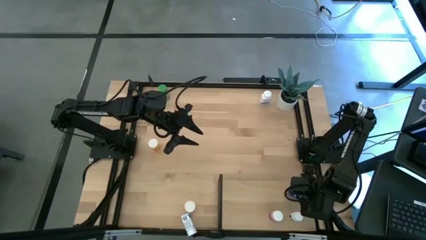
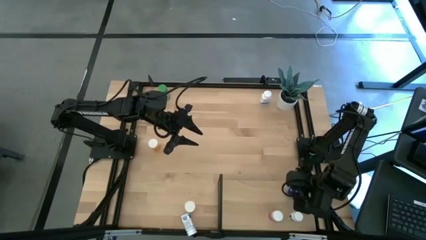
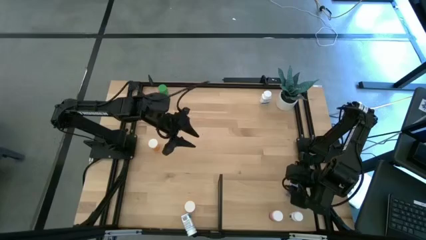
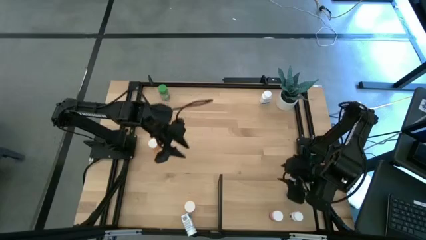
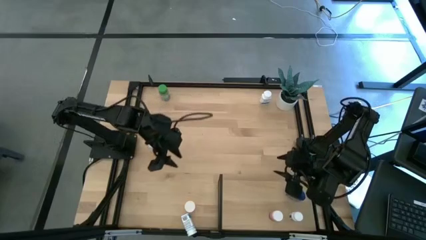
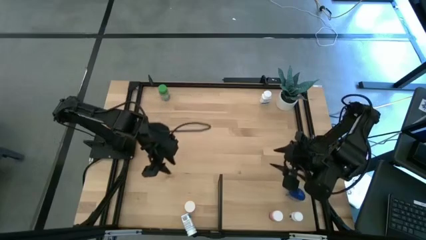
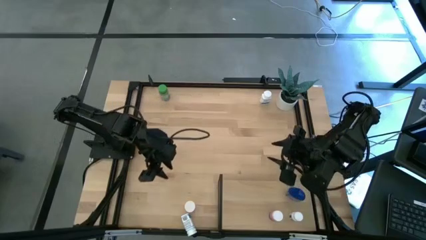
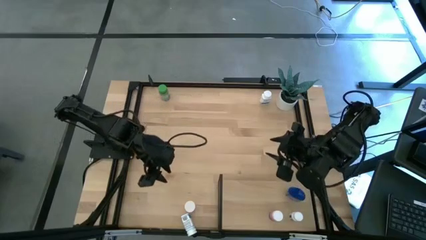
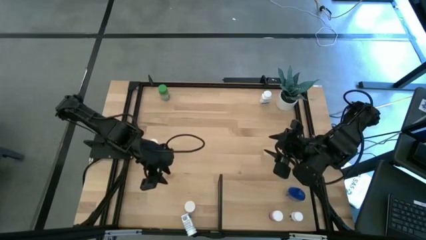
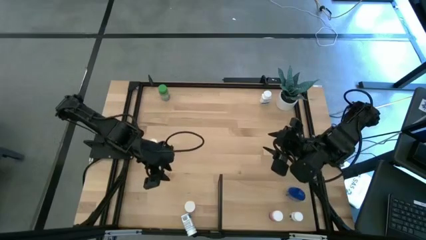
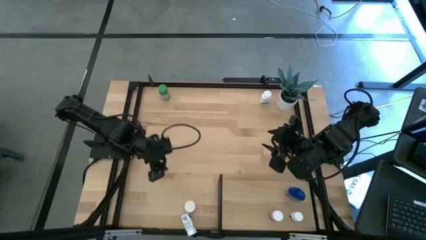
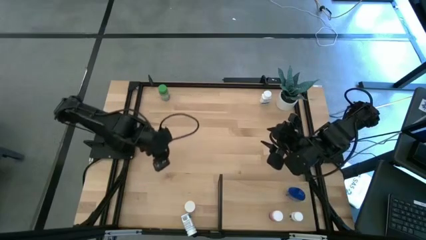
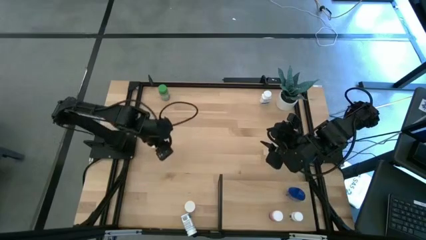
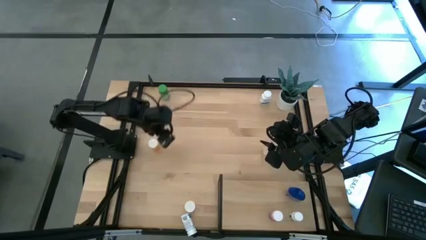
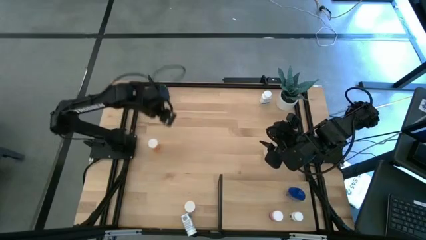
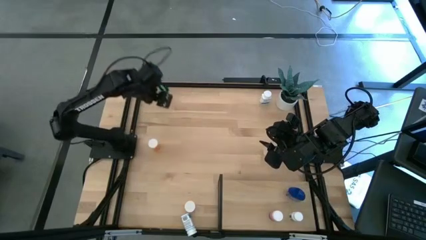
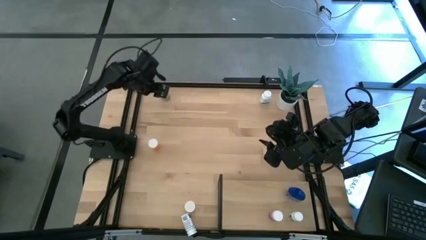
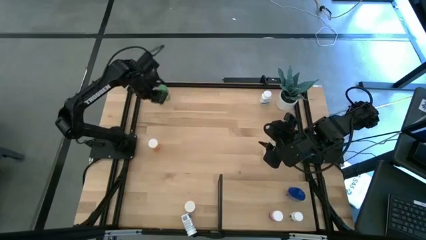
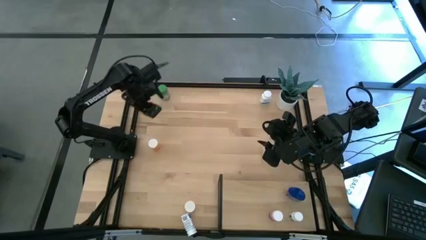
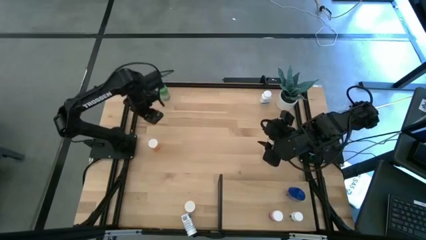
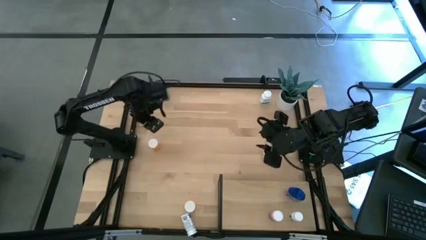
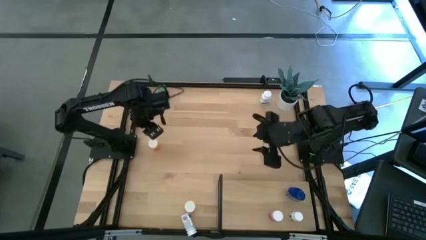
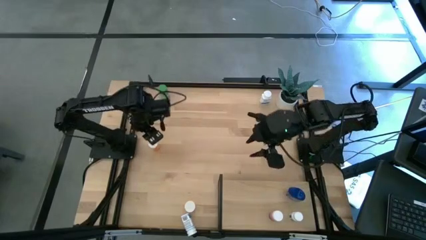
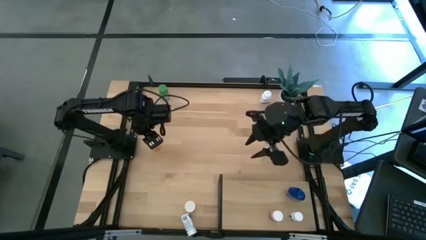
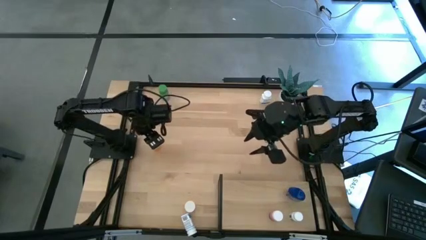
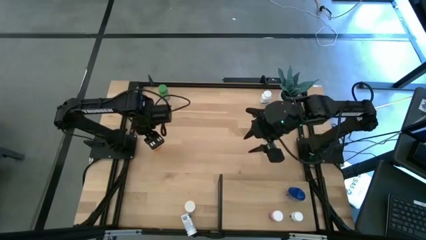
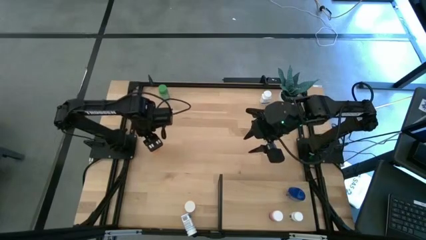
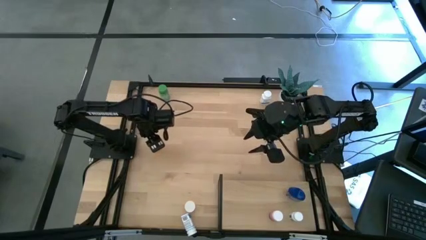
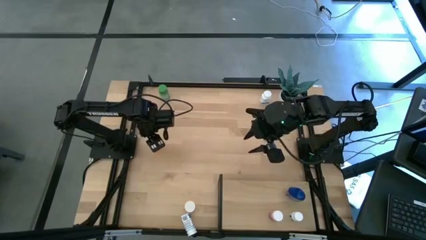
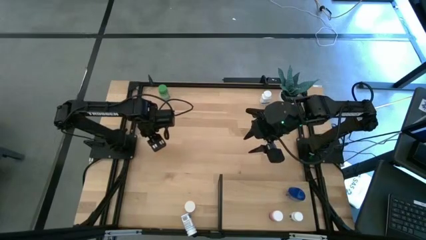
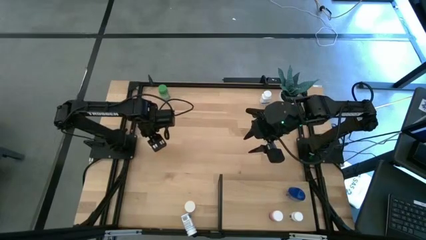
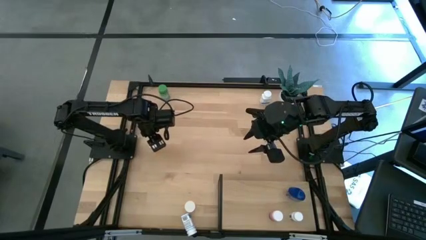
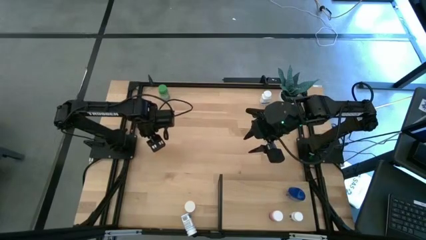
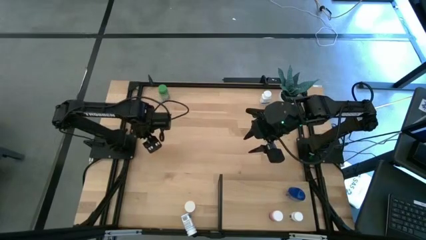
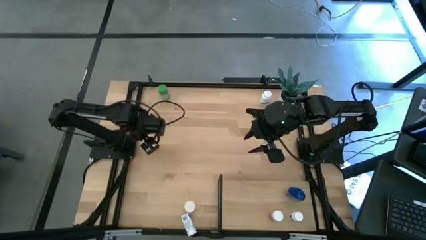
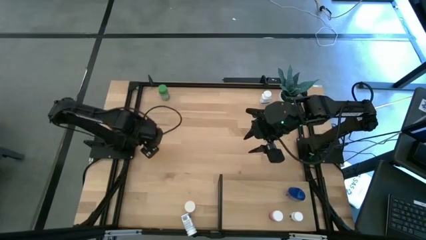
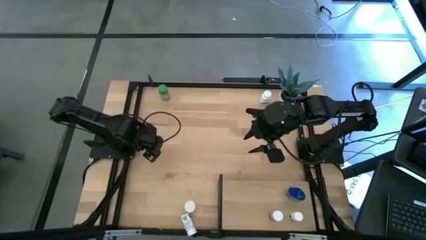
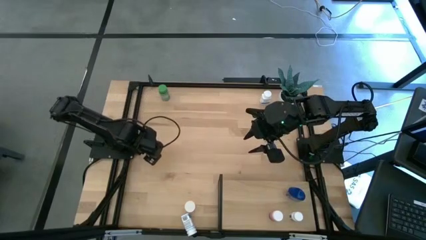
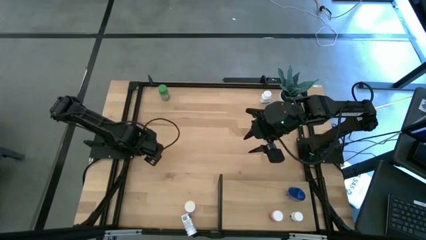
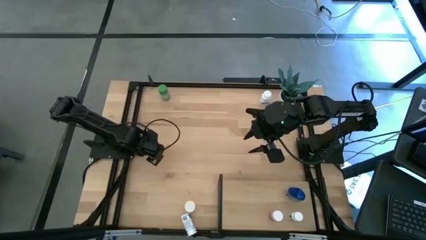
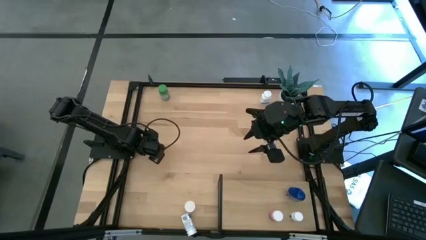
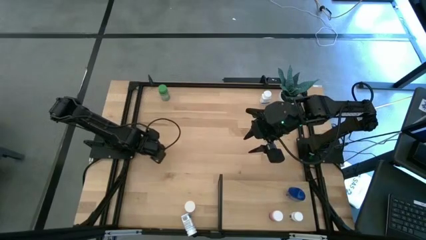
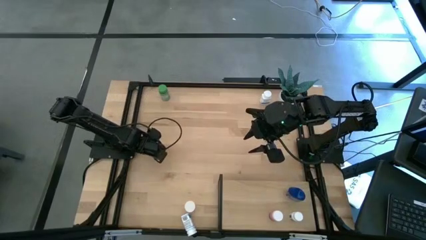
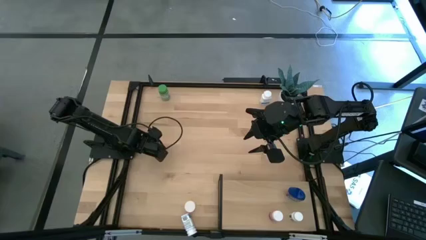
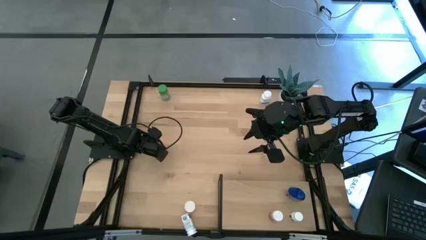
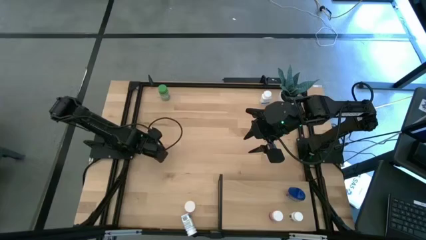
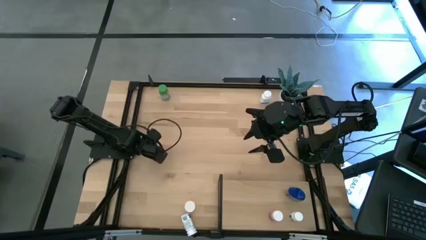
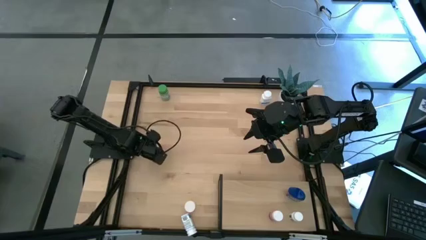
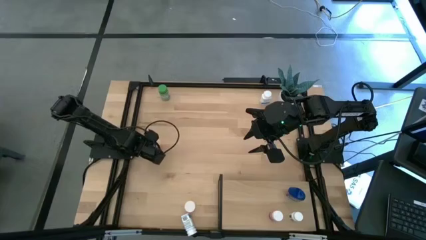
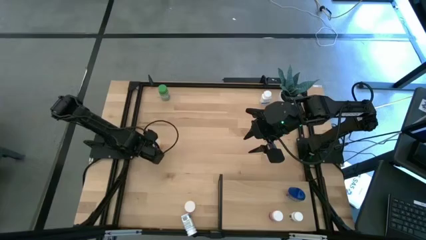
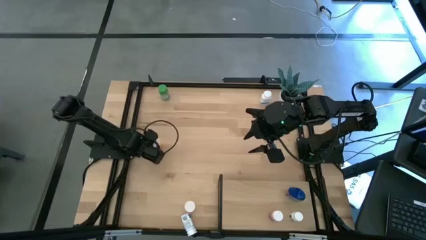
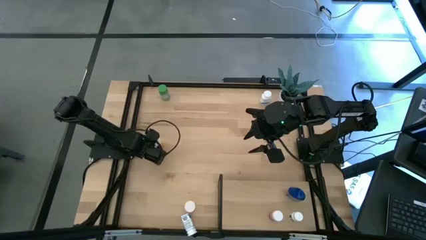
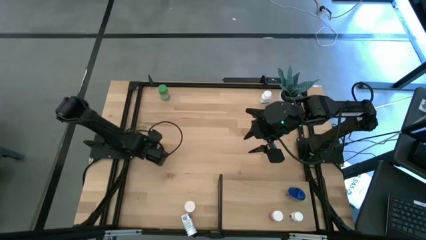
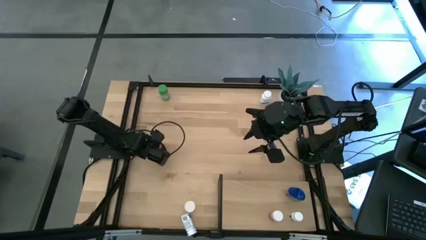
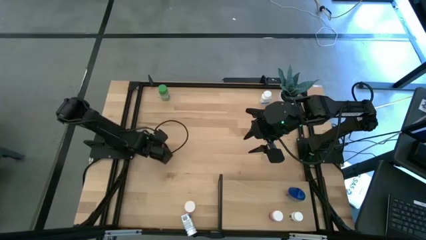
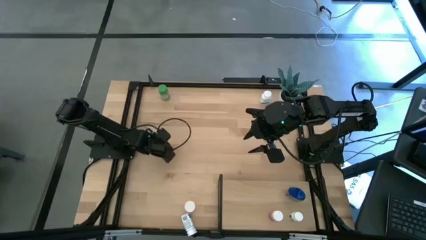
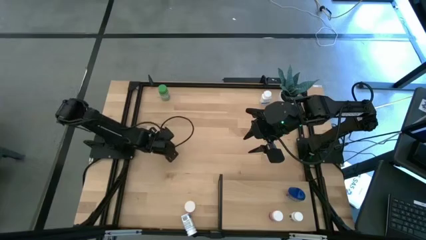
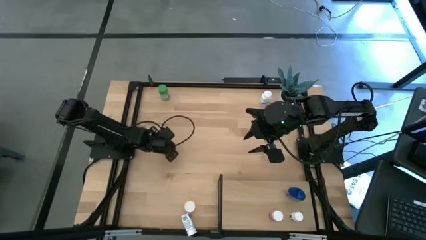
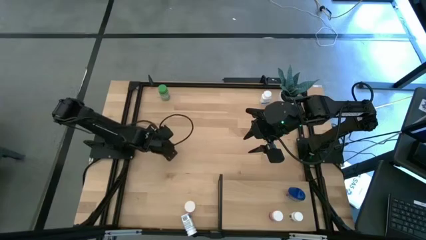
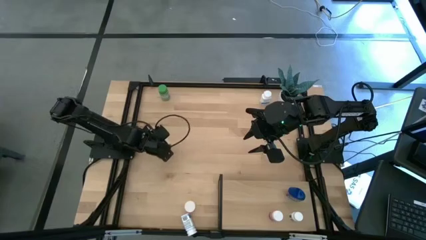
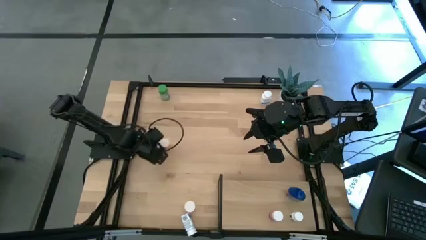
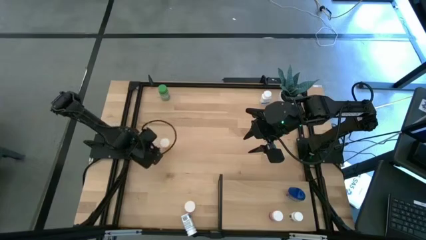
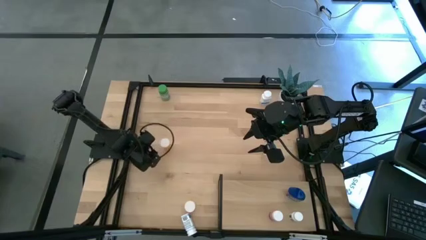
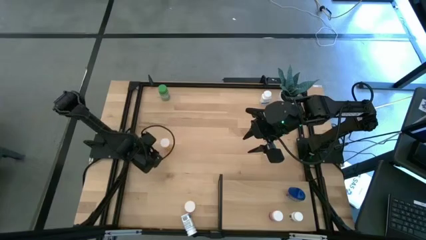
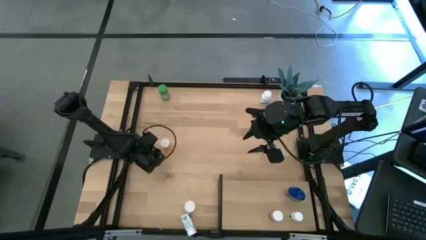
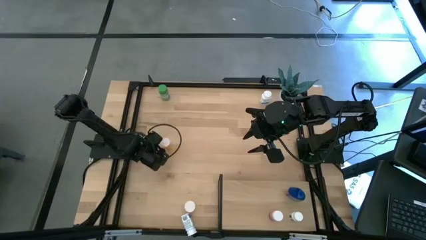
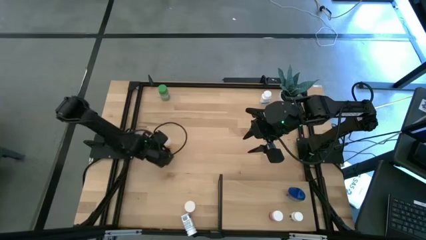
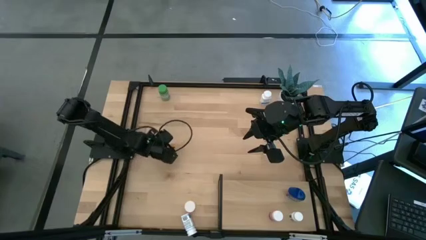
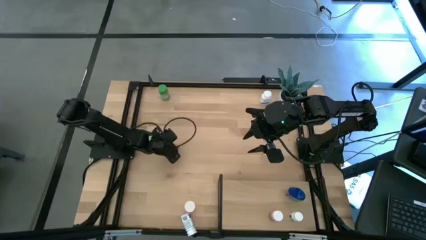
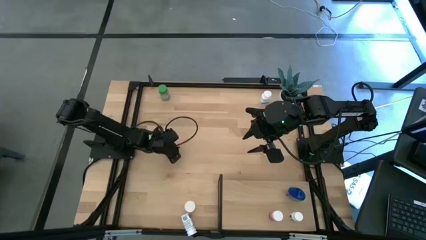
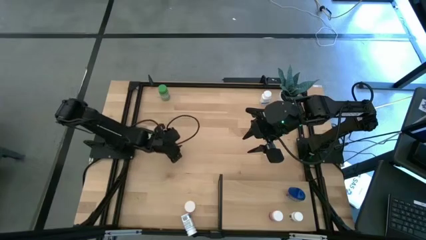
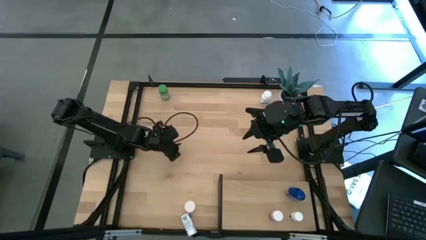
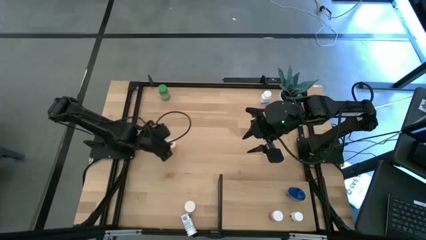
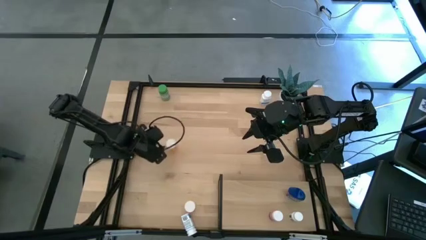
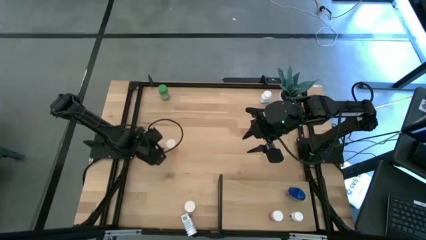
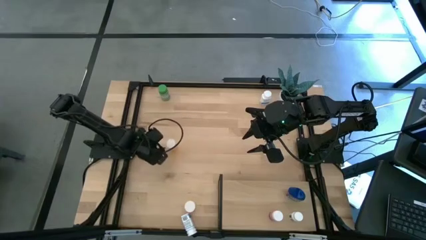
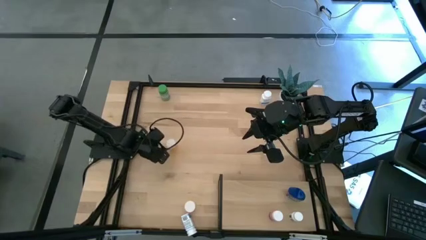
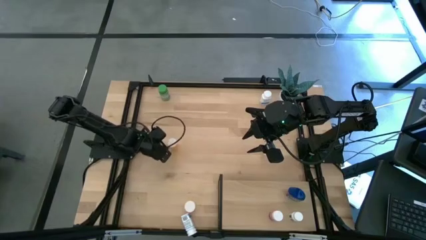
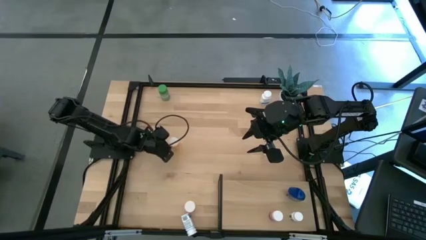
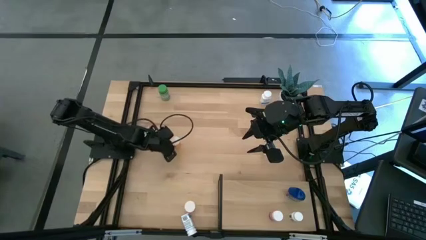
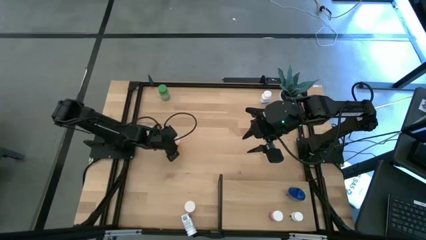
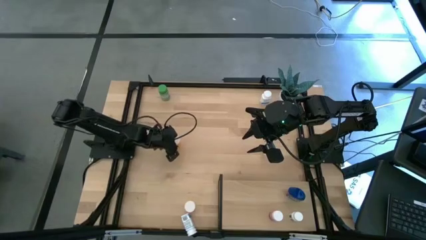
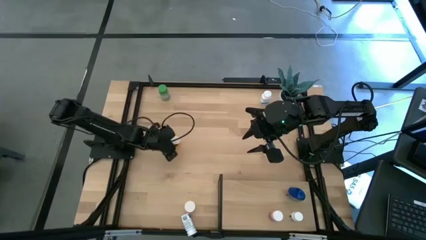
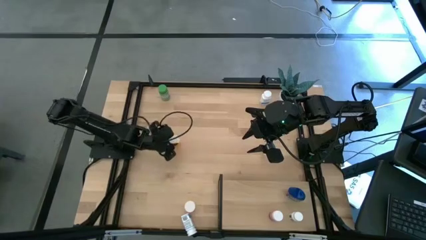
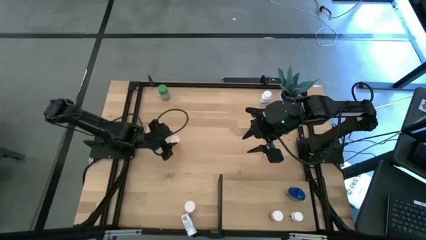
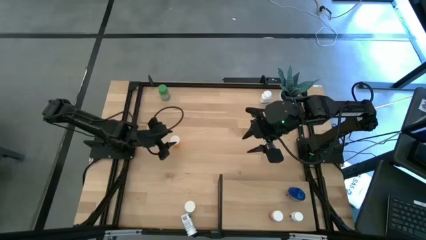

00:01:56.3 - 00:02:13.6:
Task: Pick and place medicine bottles onto shelf by color
Put the middle orange pill bottle onto the shelf
